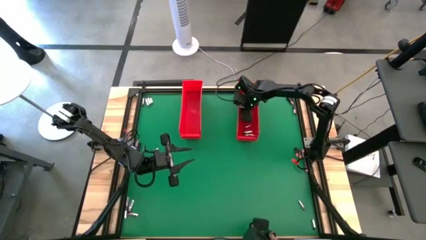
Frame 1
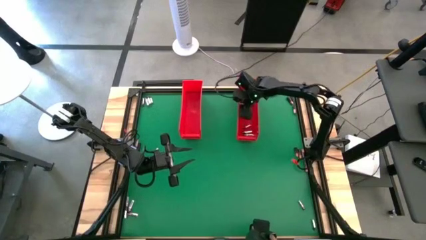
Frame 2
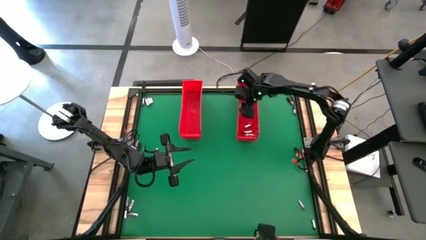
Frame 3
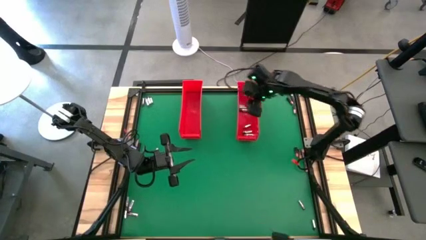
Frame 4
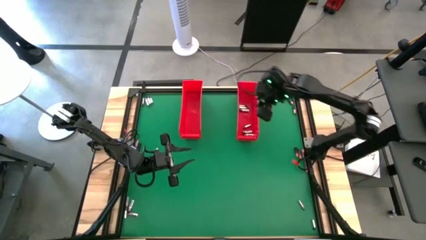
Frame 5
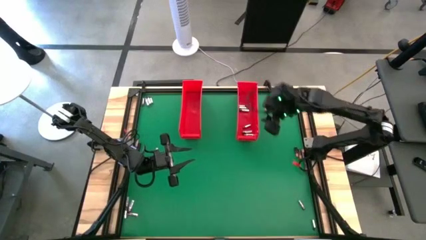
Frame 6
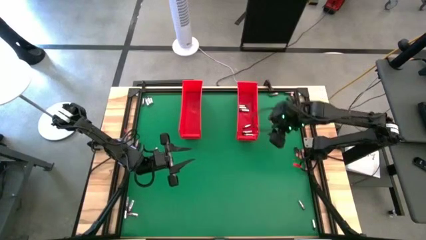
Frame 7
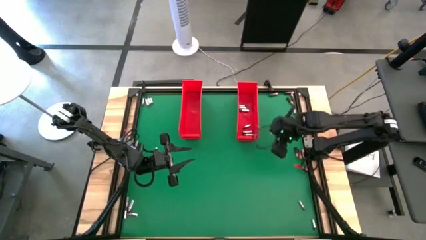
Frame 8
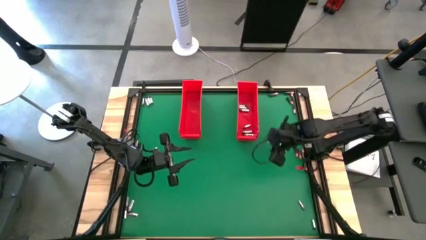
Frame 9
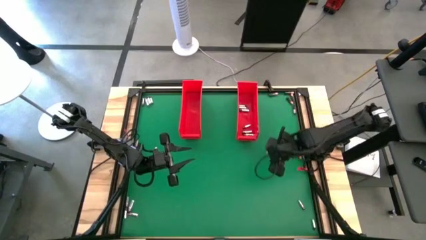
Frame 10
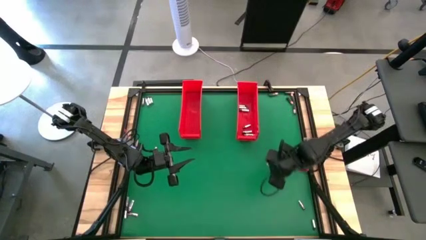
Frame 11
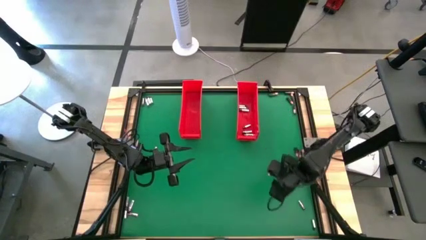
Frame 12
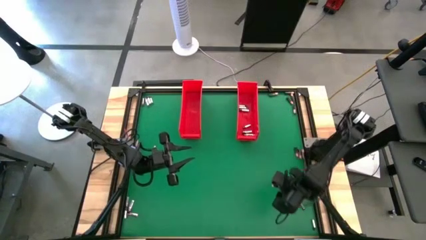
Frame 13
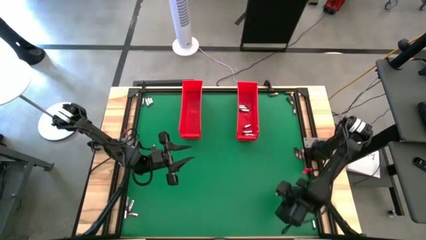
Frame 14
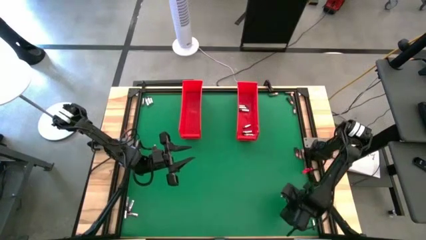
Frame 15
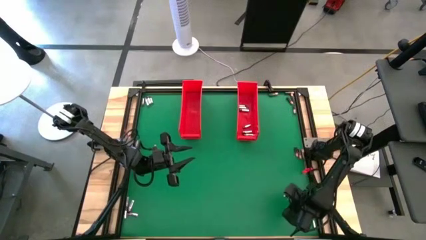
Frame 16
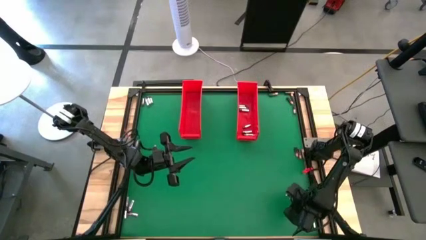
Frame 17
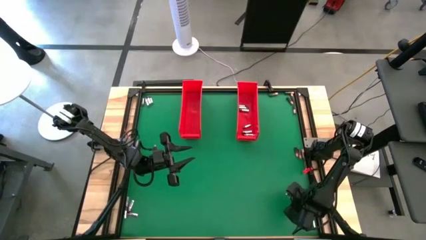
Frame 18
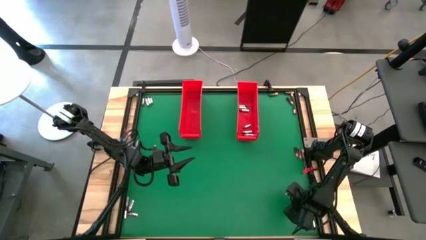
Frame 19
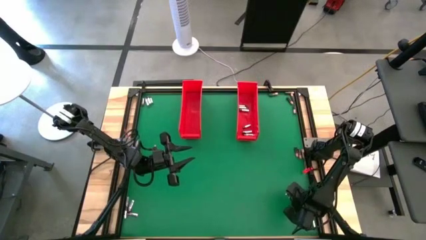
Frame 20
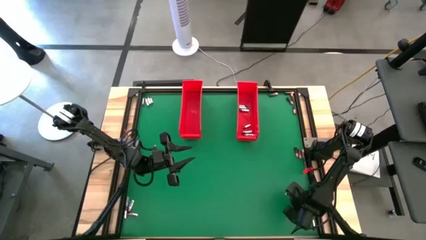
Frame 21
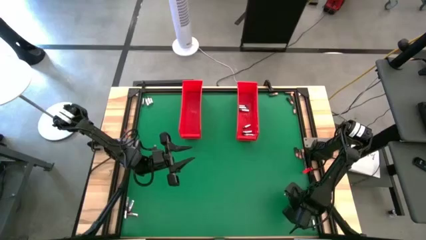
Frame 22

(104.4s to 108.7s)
Task: Sort batteries
Put the silver battery into the right red bin

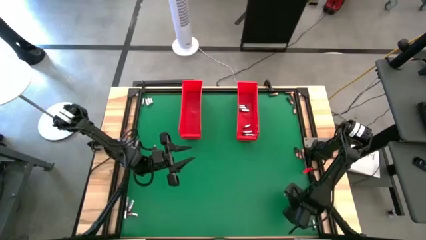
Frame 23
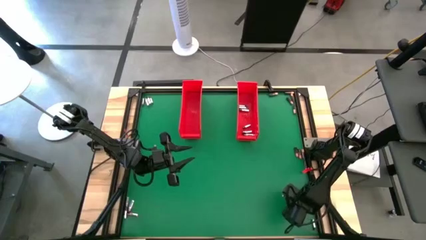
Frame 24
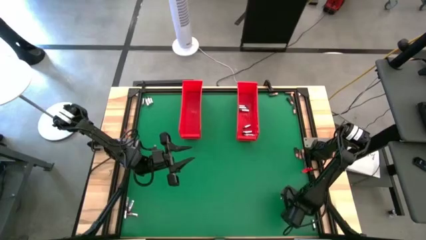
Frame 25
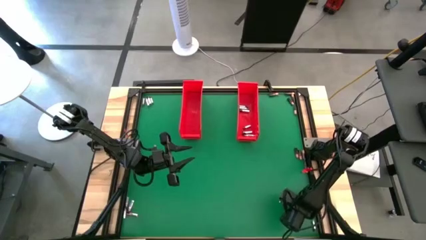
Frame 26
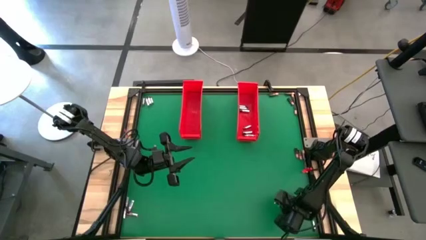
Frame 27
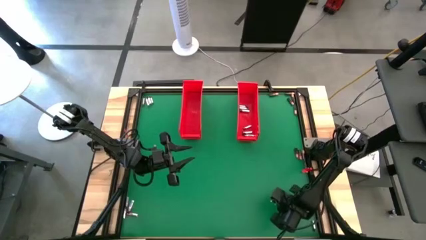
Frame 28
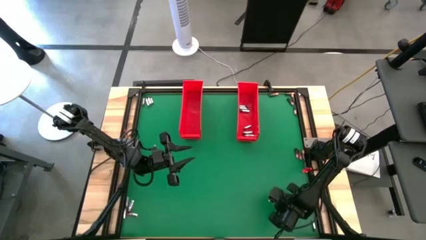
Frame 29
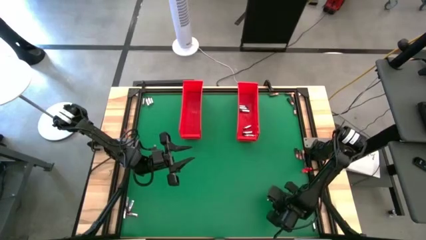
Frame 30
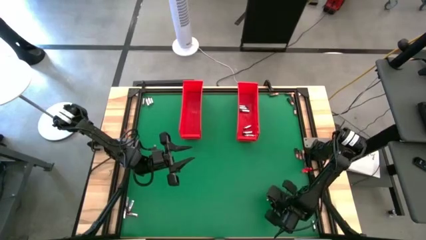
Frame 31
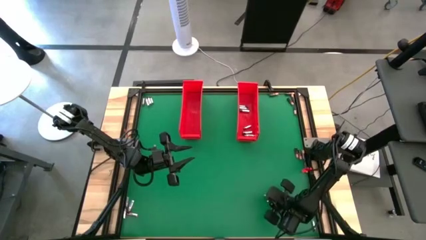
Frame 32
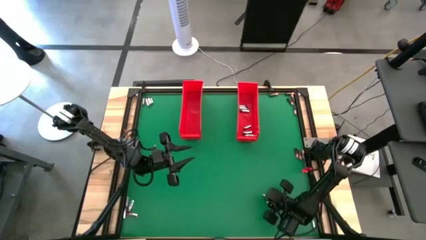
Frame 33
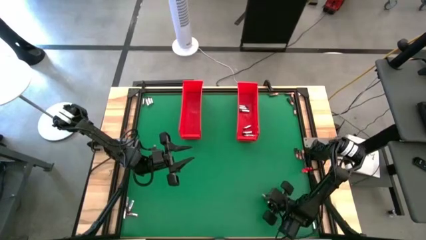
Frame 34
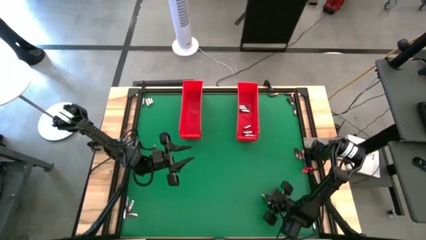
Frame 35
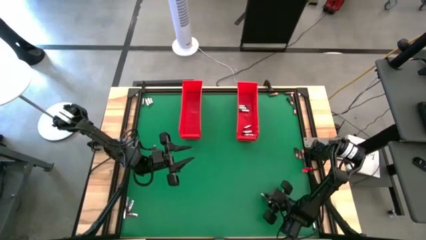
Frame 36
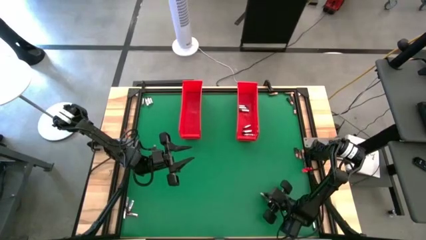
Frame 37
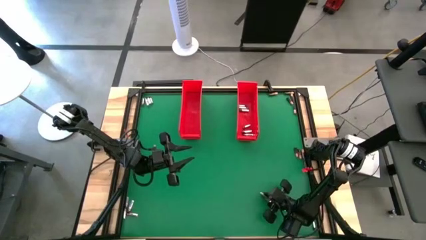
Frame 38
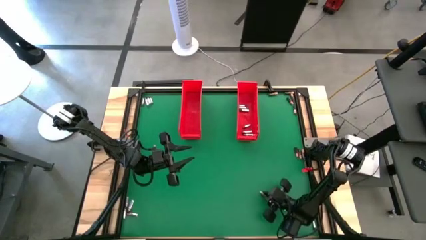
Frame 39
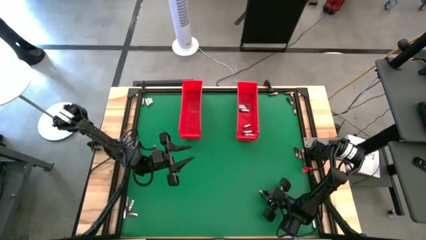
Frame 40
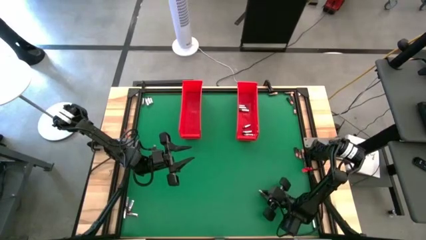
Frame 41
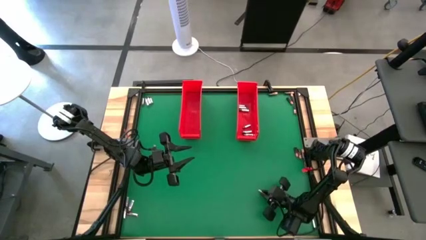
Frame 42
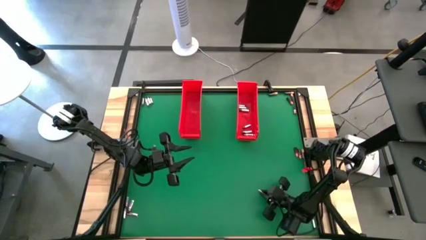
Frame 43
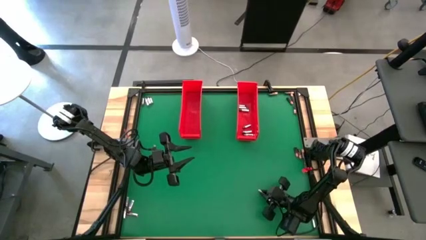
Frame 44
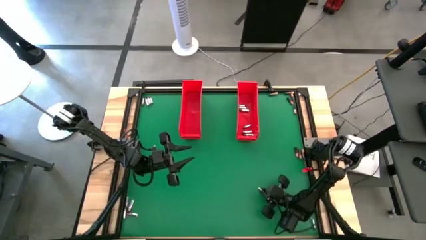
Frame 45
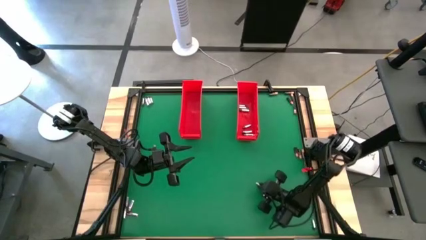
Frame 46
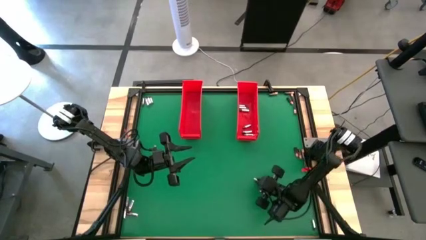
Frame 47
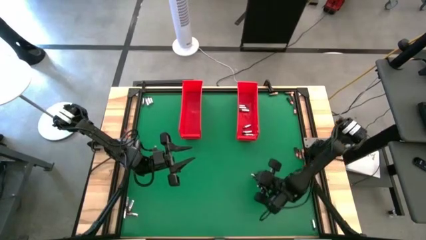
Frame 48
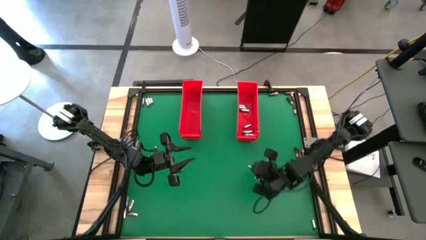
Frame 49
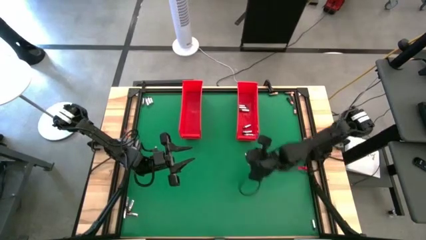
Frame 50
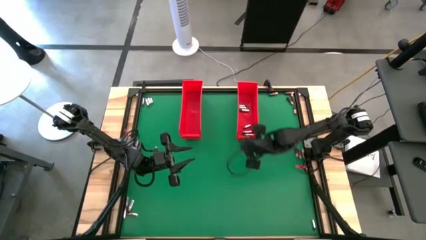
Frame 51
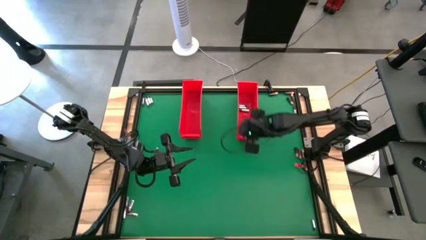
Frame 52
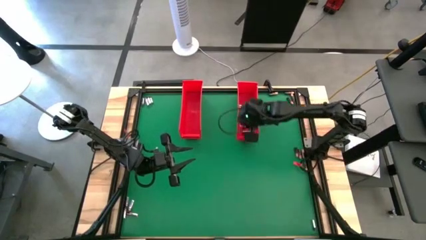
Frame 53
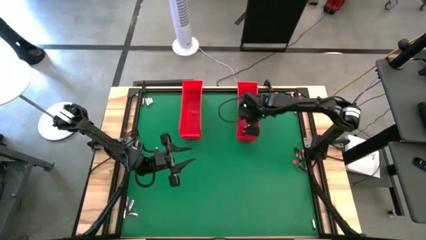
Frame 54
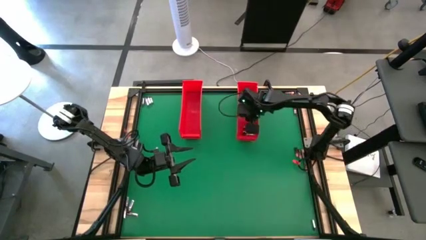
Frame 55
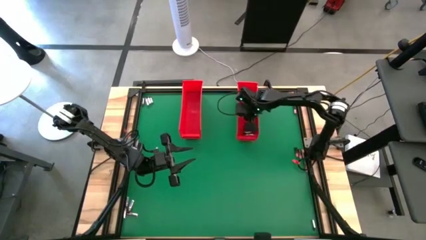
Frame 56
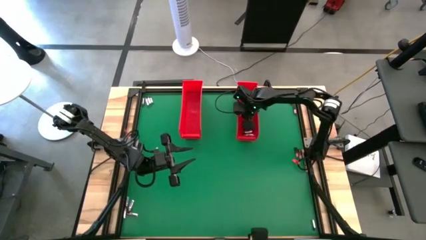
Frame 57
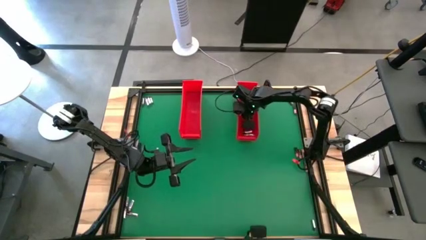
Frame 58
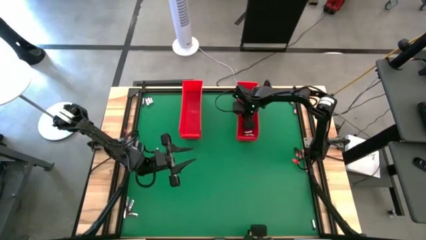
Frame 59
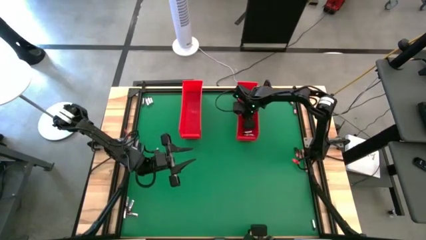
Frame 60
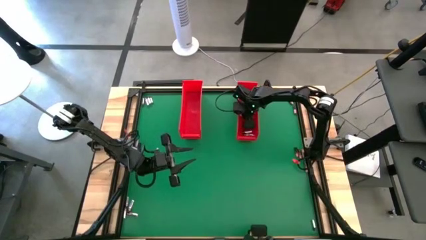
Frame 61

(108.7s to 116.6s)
Put the silver battery into the right red bin

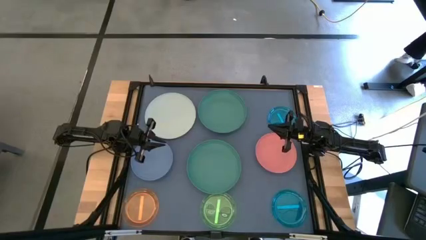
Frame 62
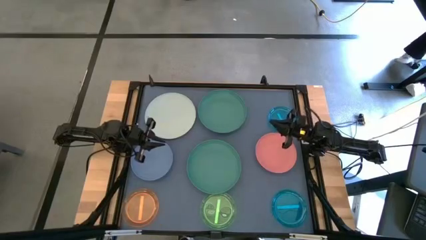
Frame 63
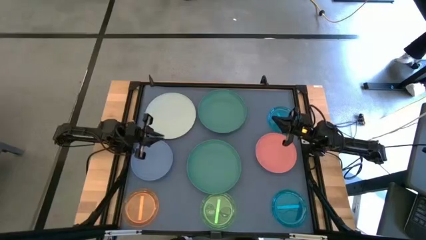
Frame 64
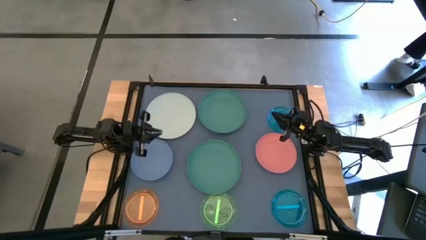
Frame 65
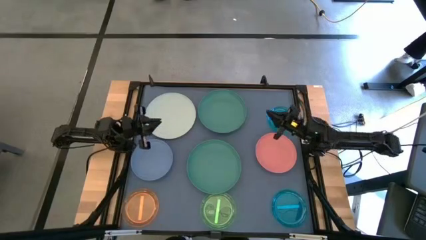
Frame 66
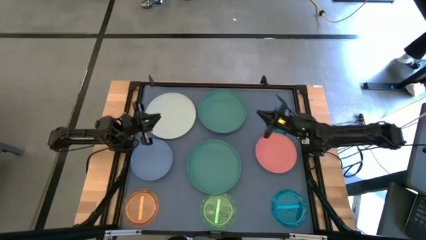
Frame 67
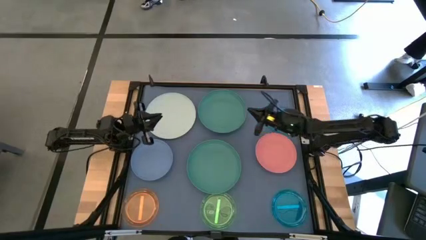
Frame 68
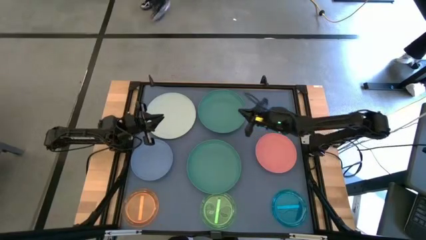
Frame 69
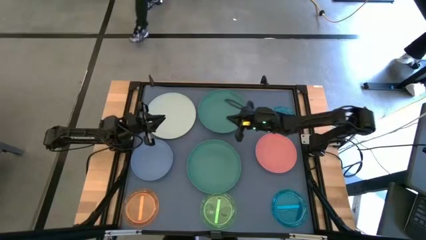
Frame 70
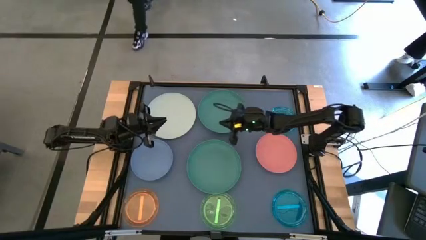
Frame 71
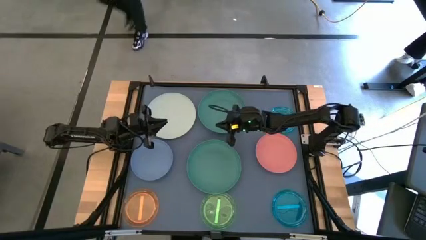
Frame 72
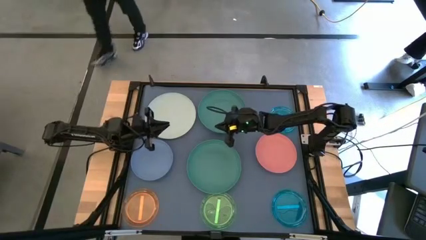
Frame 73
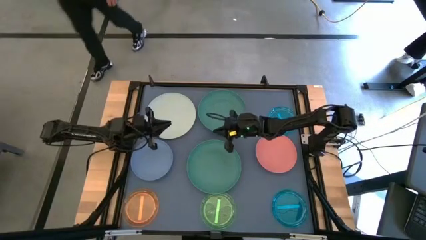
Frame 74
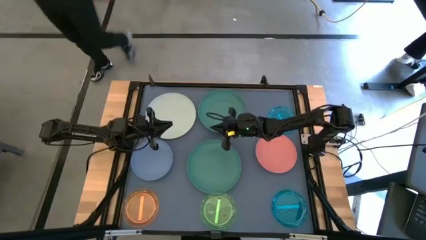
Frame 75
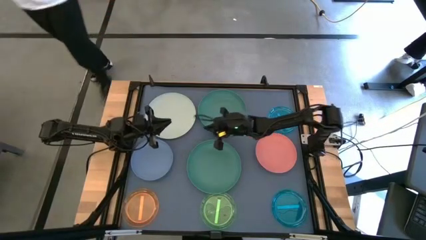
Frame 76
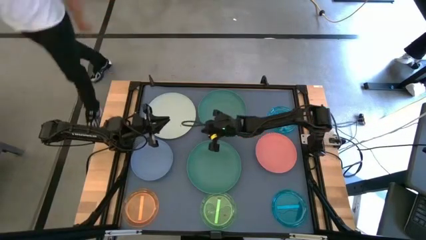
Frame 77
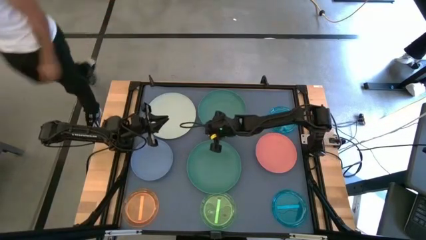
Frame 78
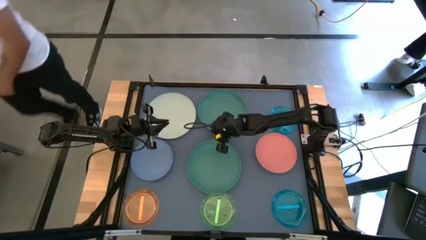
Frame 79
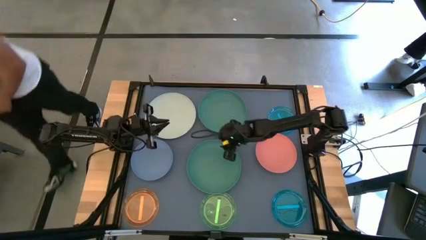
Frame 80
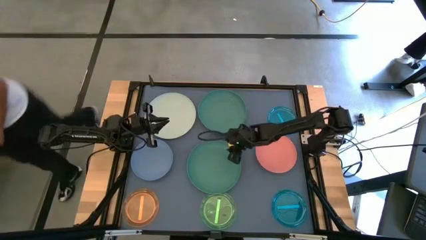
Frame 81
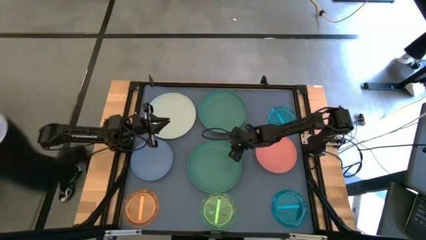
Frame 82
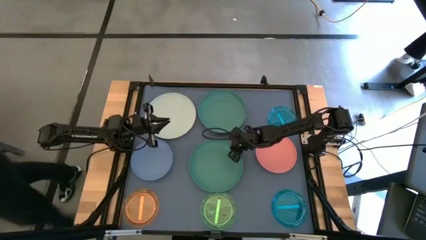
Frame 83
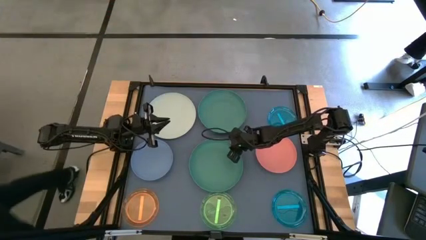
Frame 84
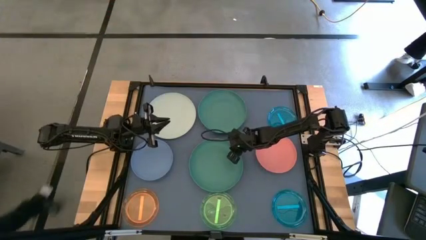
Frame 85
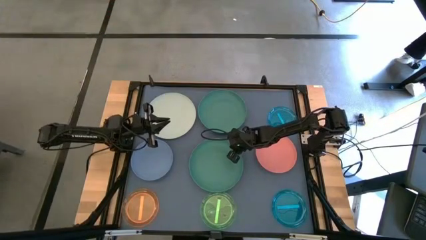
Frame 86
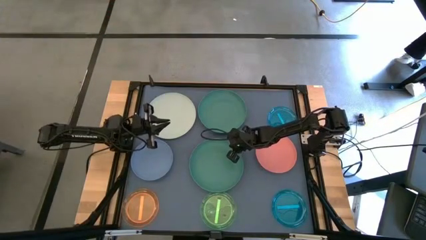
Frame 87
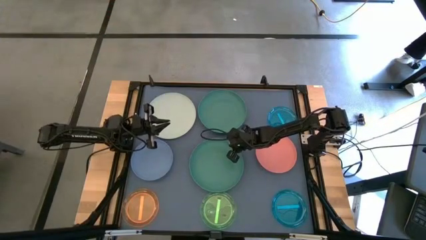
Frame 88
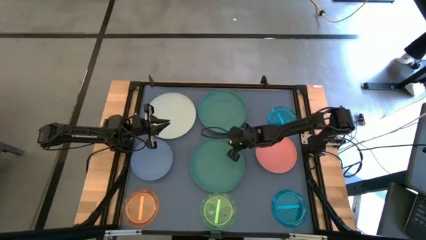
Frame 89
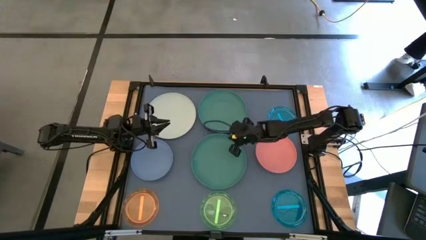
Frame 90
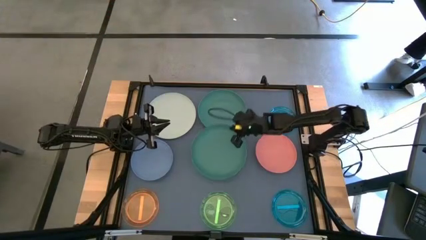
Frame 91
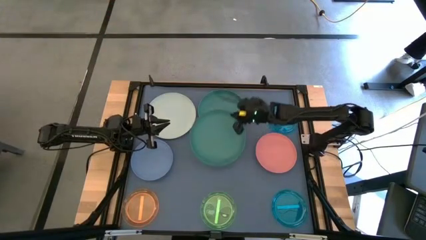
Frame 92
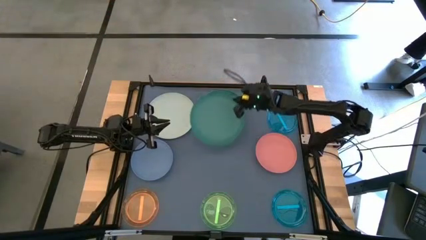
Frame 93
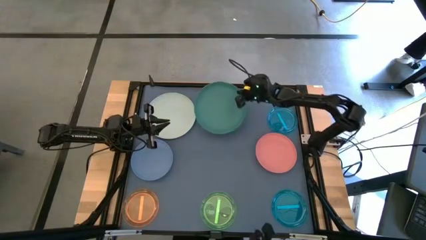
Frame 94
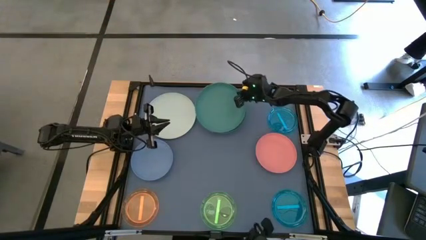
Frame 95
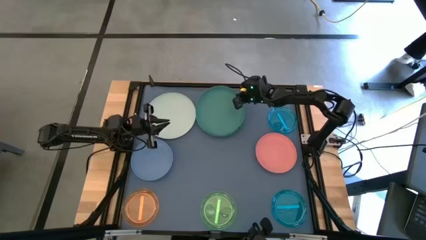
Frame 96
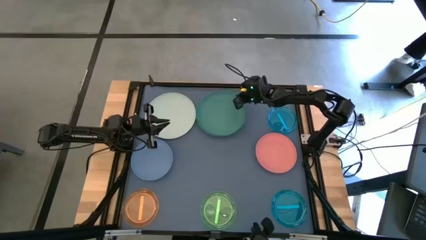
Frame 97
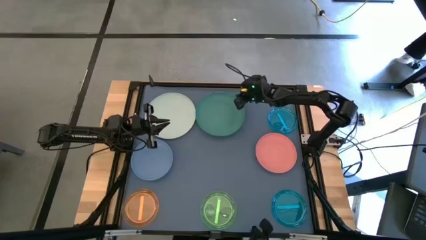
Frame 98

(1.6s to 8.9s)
Task: Stack plastic plates
Stack the bottom green plate on top of the green plate
